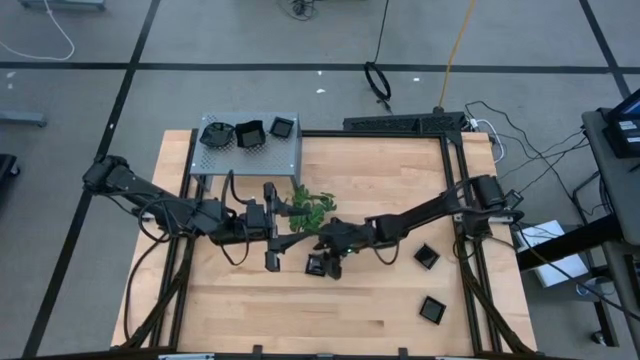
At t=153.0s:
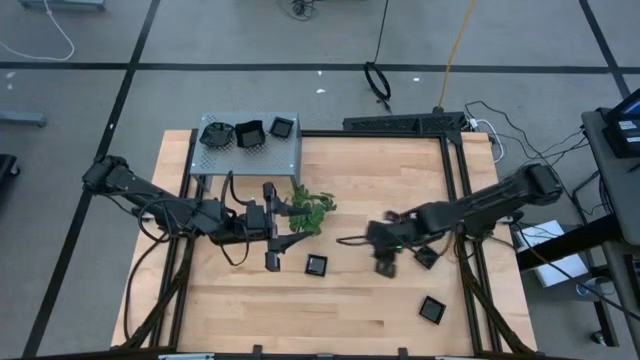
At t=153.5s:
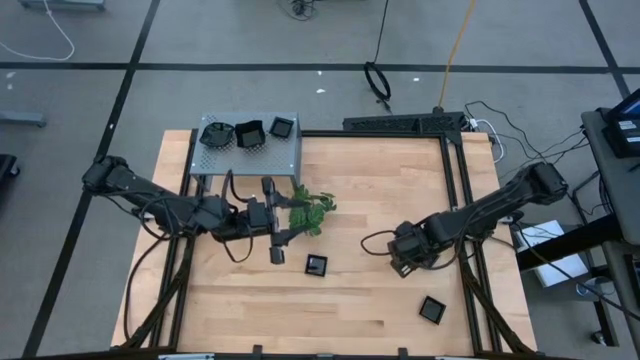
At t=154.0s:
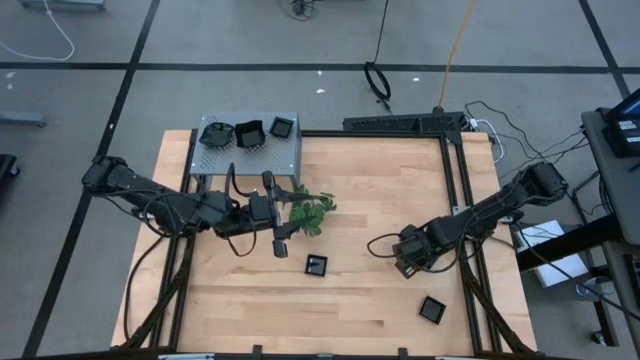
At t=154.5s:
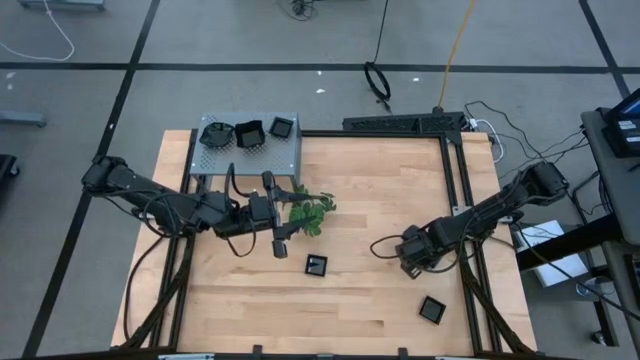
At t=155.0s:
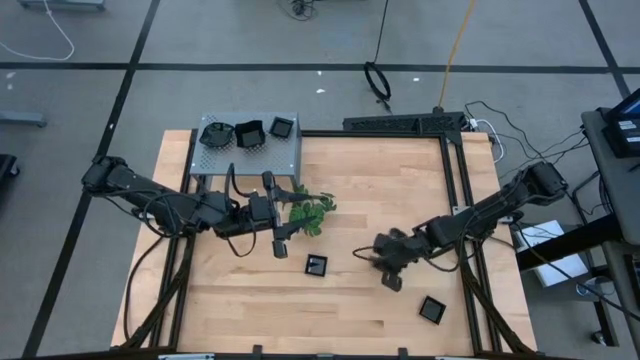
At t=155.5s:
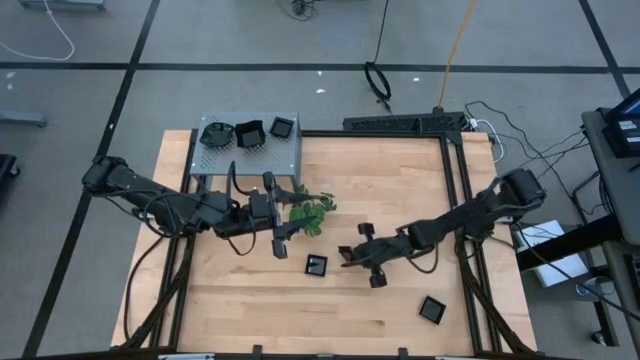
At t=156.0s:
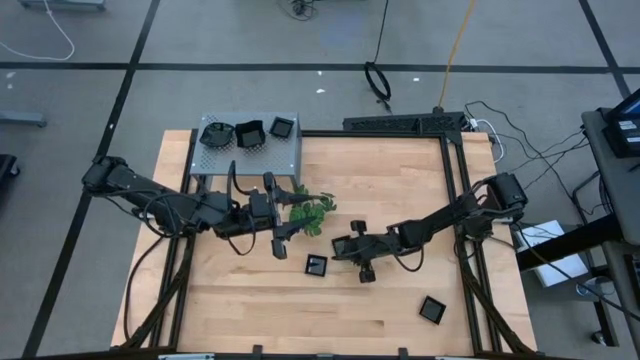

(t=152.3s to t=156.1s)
Task: Pick & Place Mini shaped plates
Move the square plate to the center of the table

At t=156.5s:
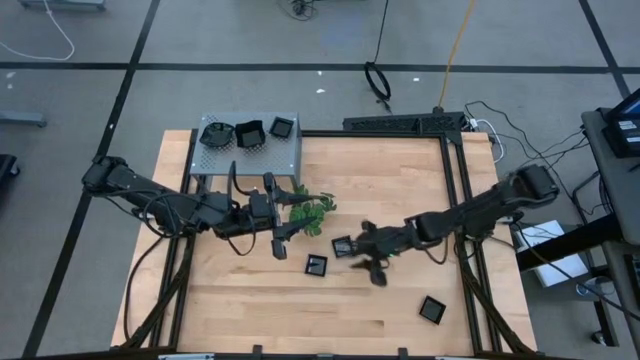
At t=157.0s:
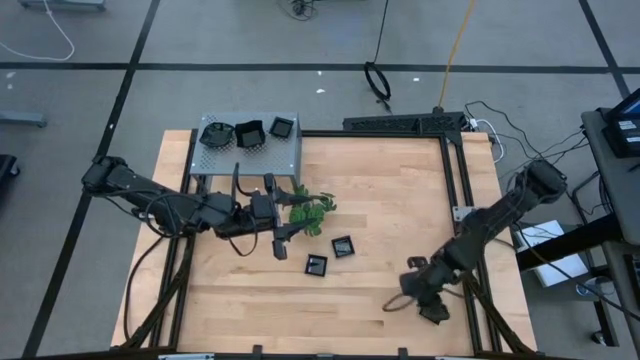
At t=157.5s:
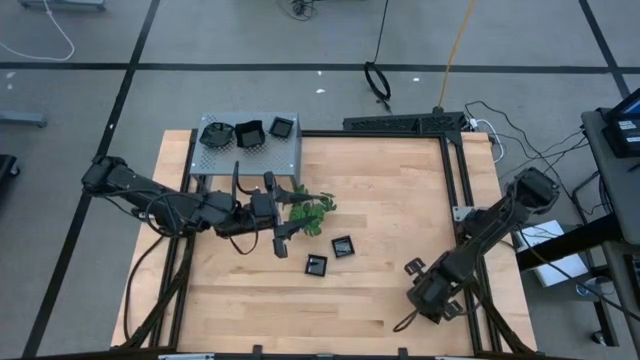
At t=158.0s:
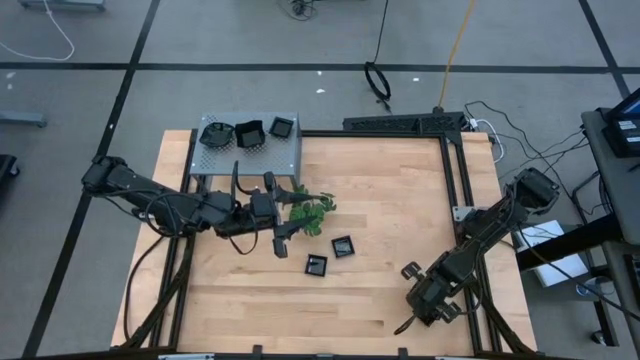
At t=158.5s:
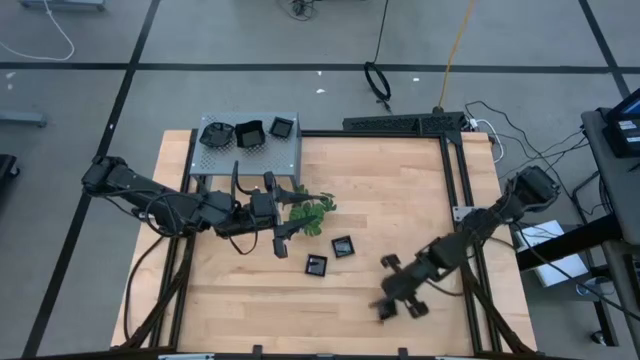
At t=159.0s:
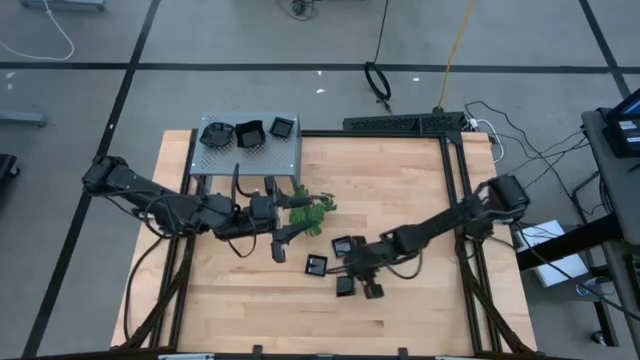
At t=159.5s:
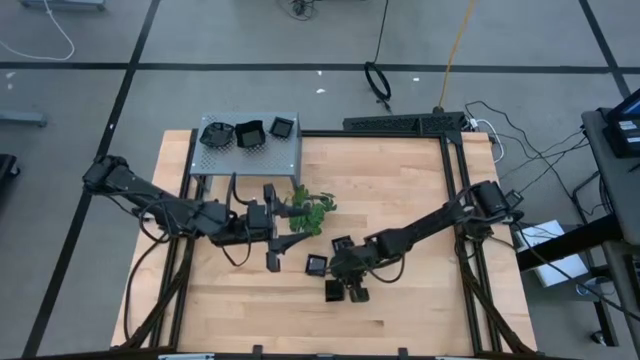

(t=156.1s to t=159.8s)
Move the square plate to the center of the table

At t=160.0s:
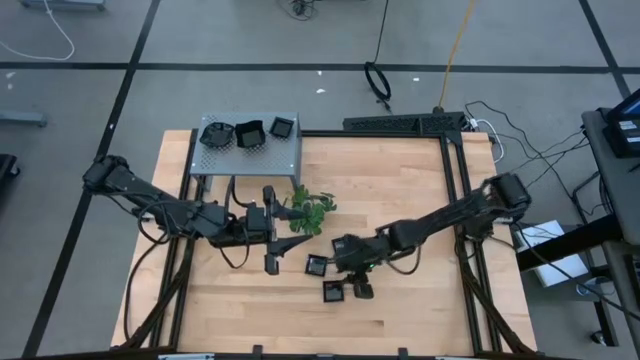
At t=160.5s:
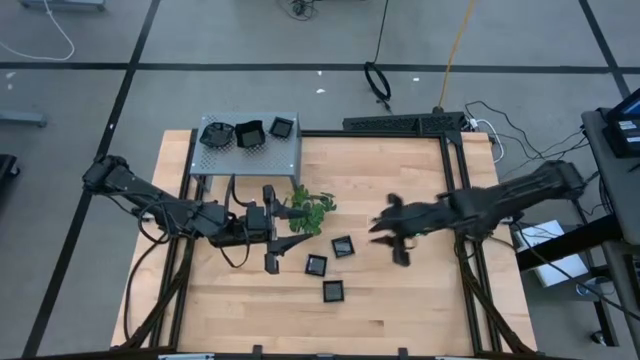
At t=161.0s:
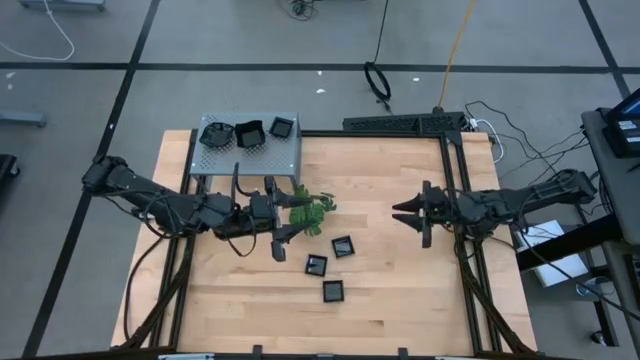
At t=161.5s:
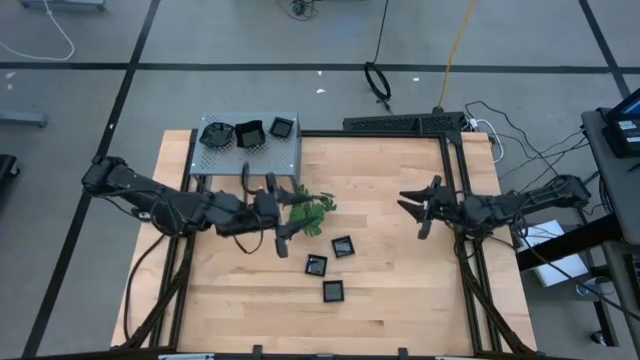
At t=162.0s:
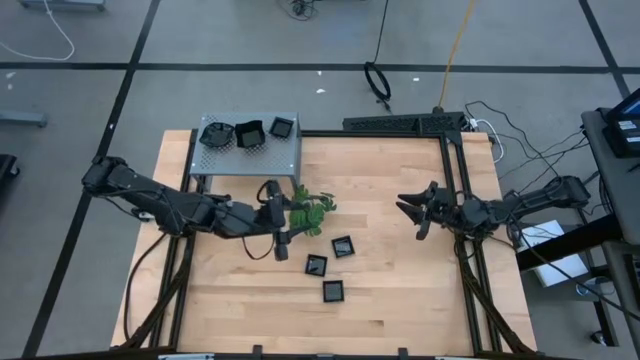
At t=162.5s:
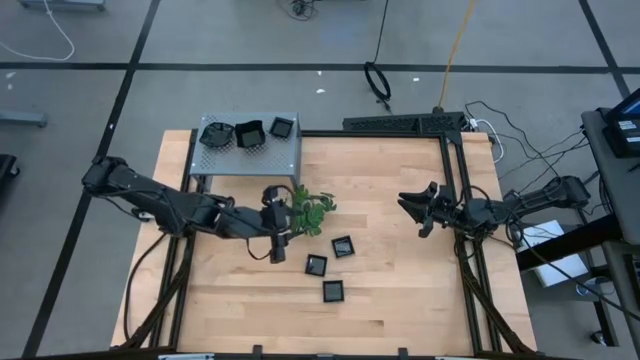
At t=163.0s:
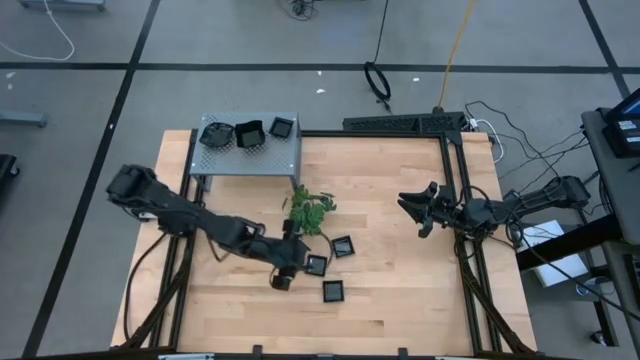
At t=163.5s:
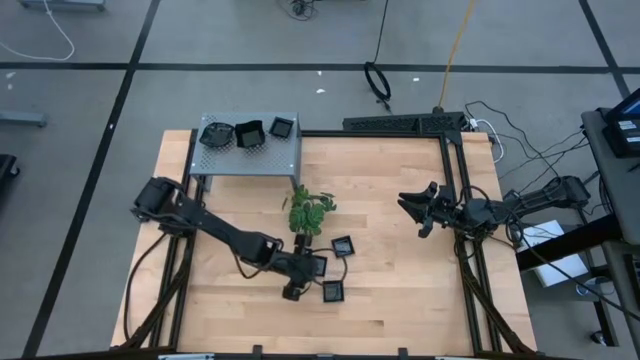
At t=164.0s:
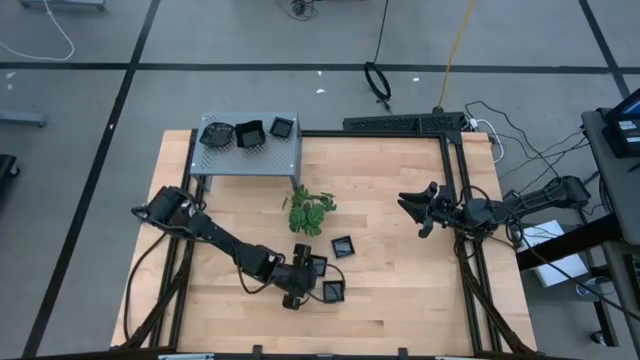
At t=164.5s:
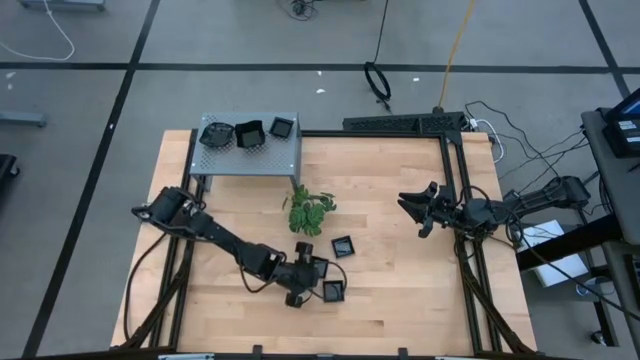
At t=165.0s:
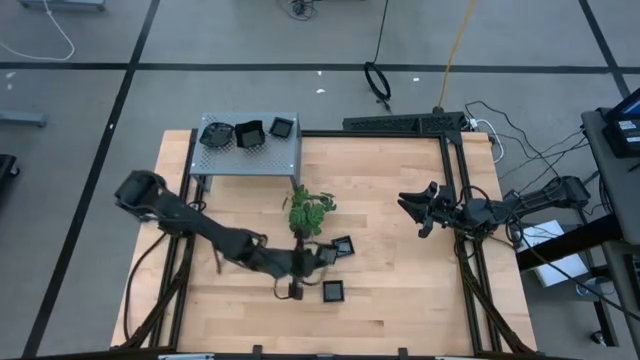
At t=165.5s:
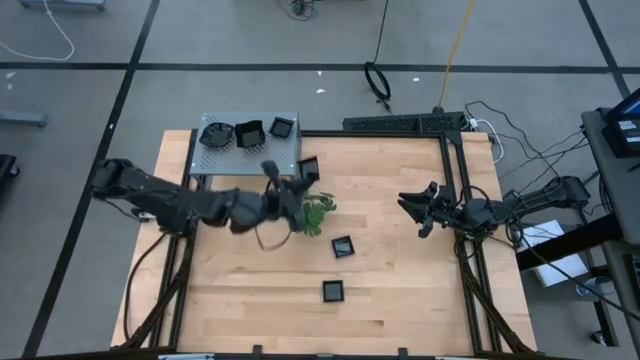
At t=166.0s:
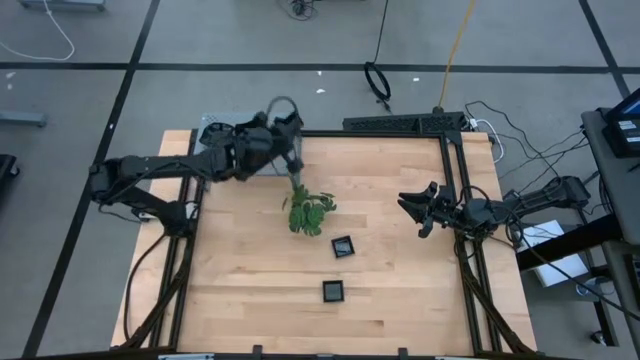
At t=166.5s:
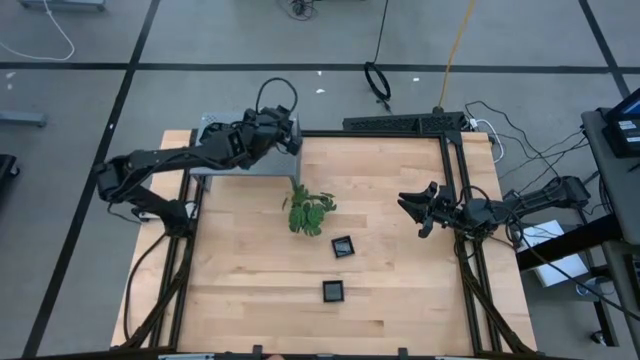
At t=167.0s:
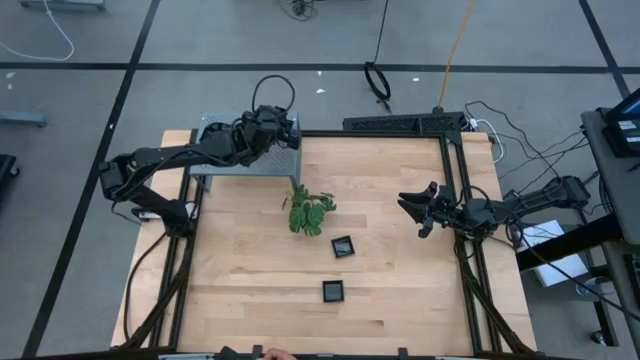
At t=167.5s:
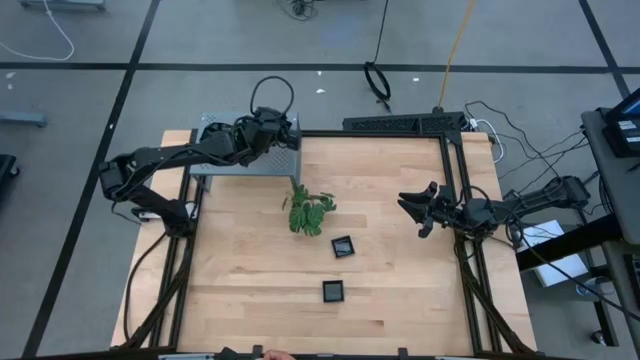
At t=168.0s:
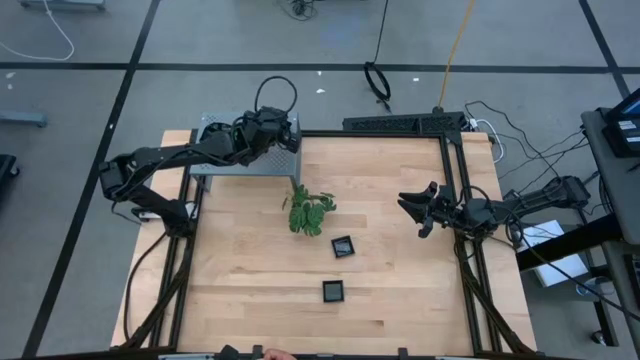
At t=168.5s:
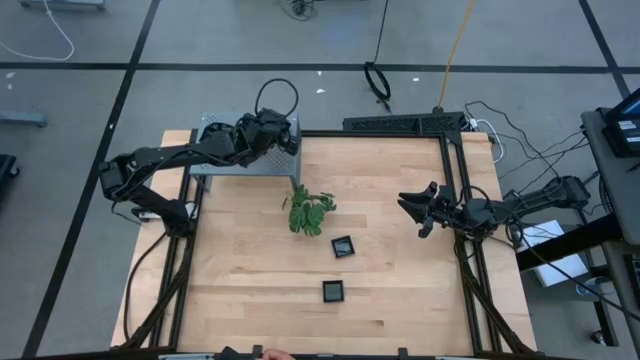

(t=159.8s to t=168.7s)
Stack the square plate on top of the square plate on the shelf

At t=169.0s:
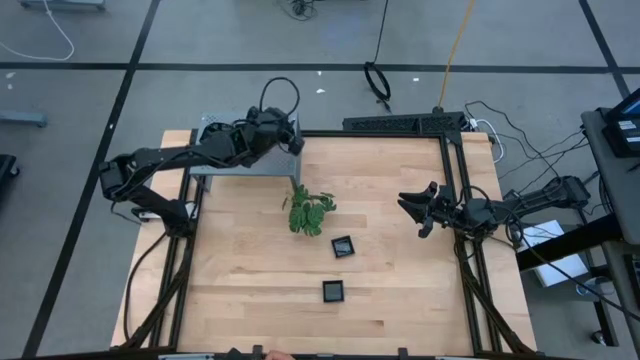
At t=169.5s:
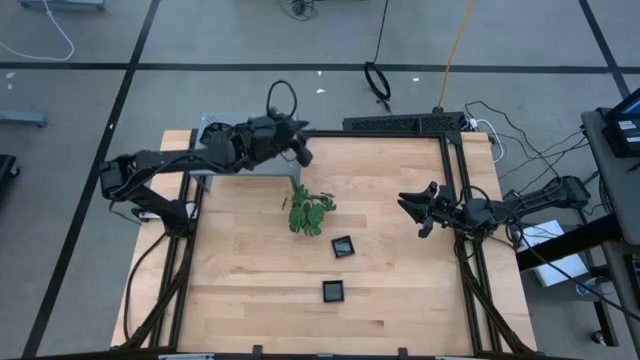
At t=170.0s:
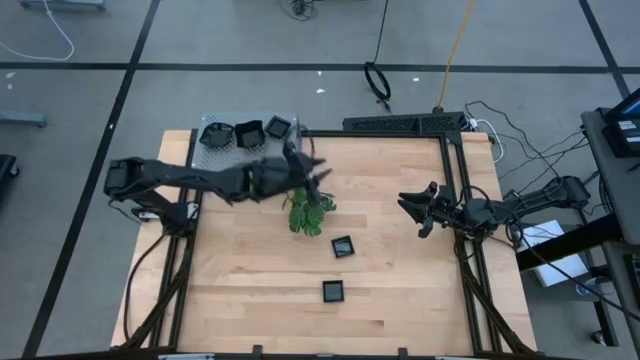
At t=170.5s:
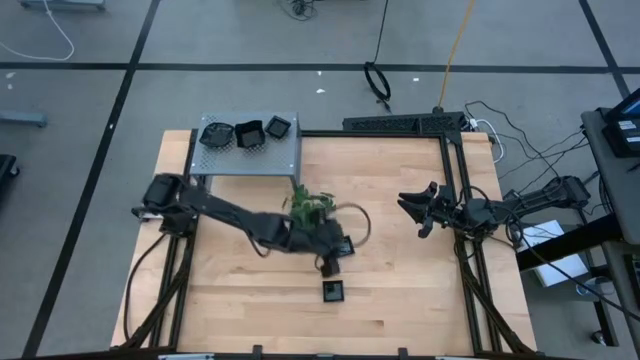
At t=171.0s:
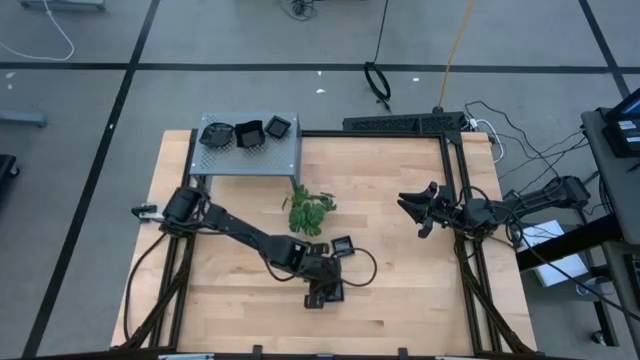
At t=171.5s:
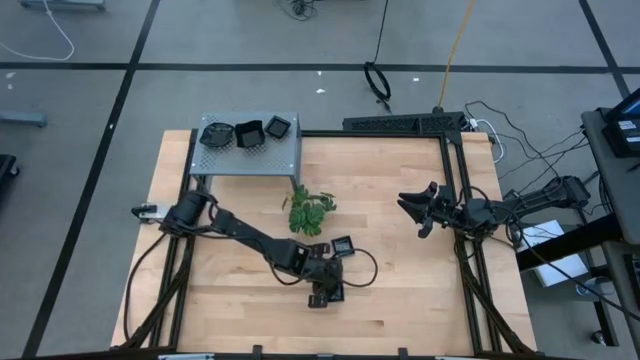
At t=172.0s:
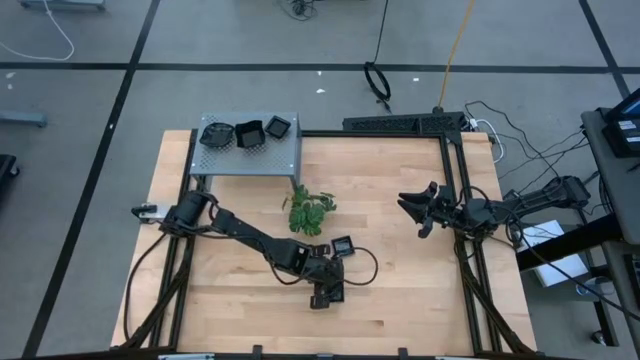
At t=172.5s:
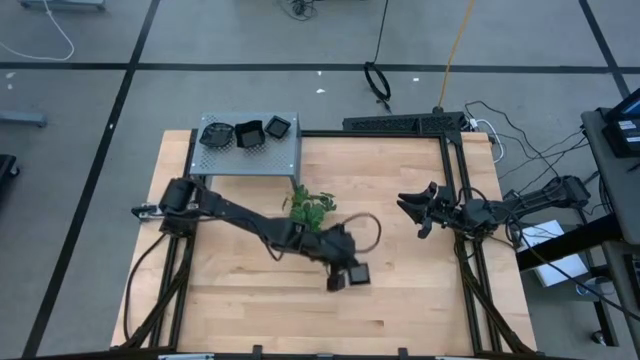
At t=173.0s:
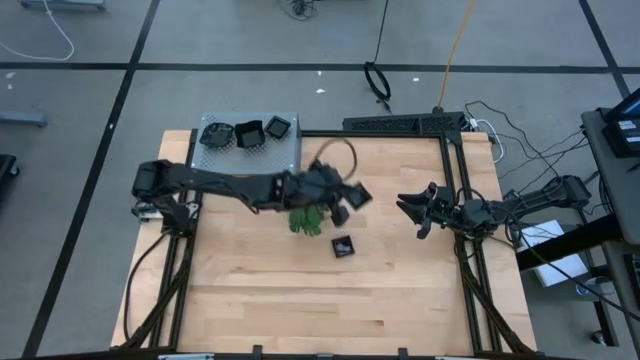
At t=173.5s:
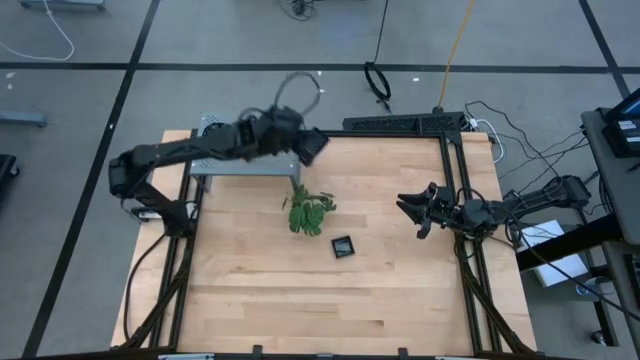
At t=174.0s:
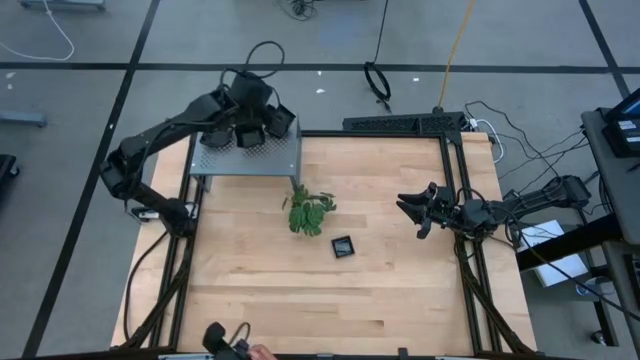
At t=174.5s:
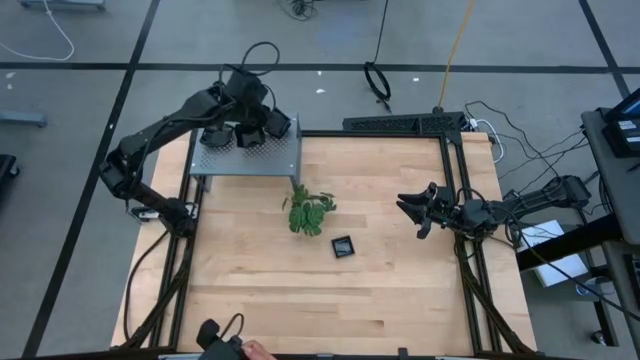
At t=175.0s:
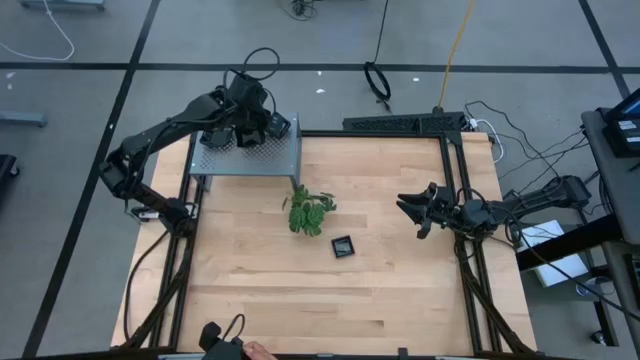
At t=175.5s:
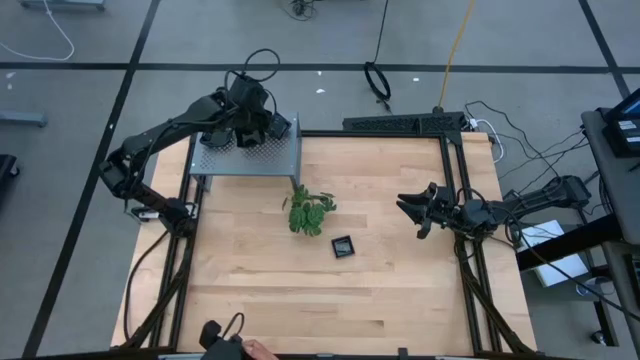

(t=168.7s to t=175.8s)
Stack the square plate on top of the square plate on the shelf
